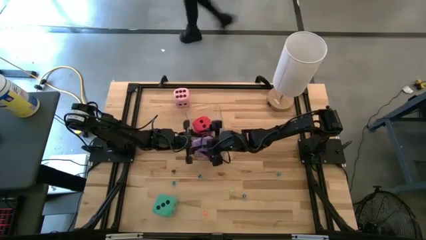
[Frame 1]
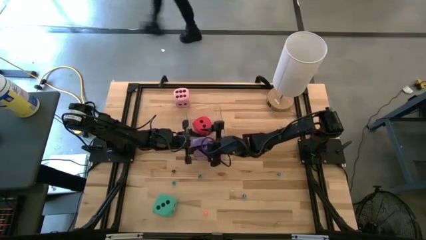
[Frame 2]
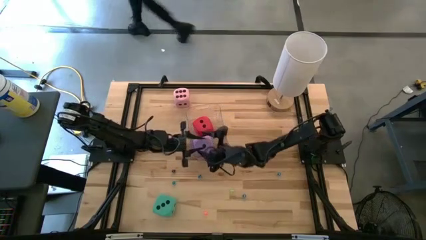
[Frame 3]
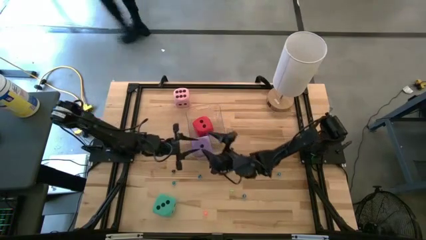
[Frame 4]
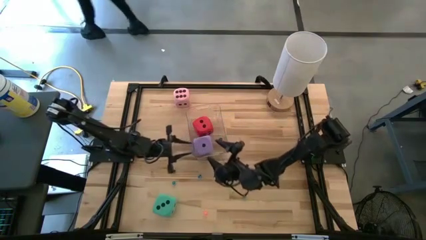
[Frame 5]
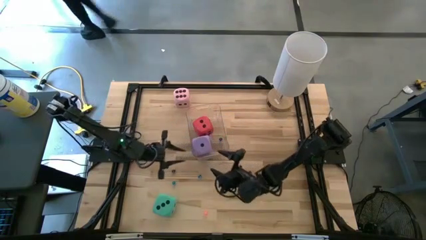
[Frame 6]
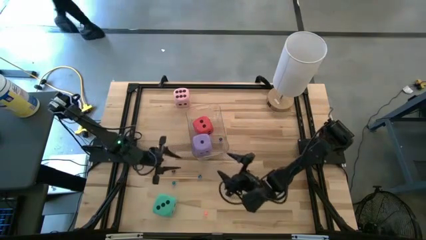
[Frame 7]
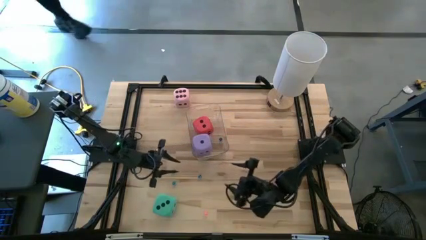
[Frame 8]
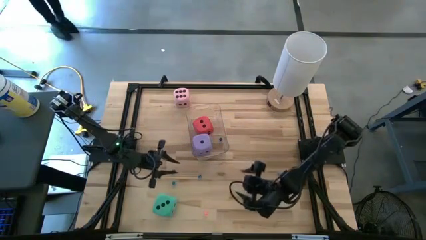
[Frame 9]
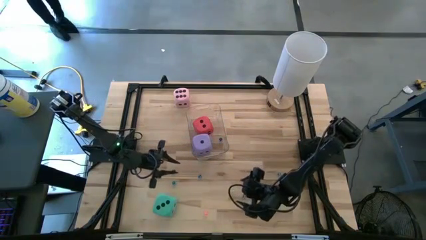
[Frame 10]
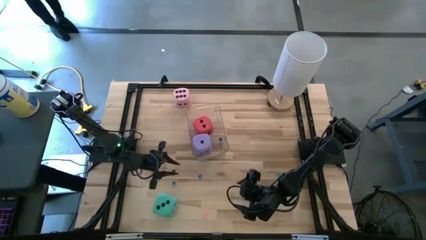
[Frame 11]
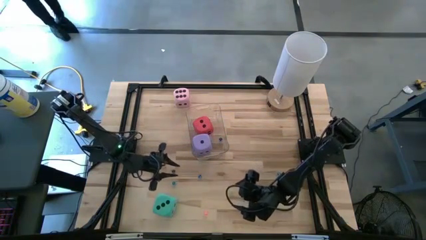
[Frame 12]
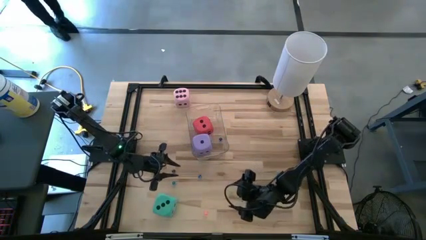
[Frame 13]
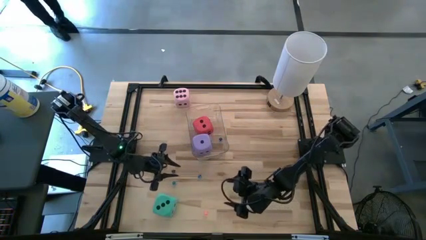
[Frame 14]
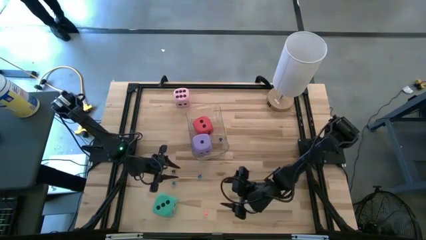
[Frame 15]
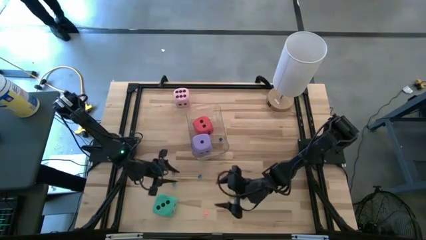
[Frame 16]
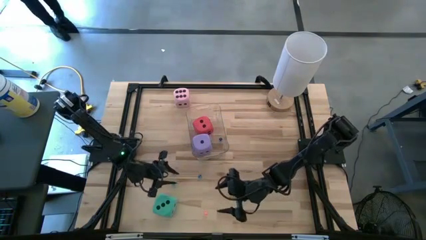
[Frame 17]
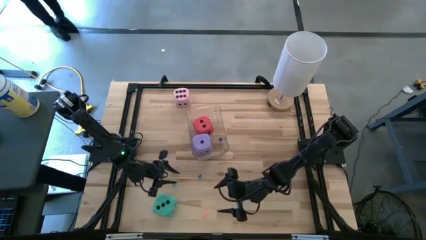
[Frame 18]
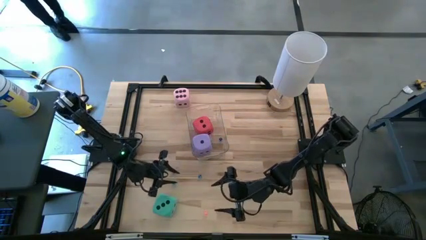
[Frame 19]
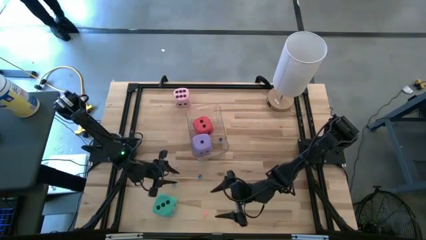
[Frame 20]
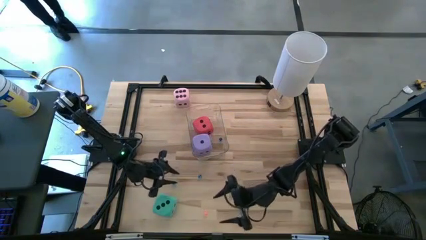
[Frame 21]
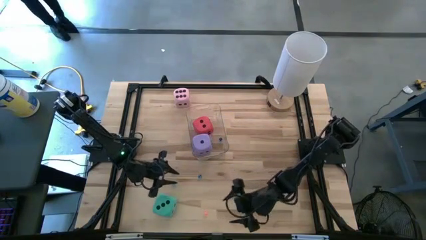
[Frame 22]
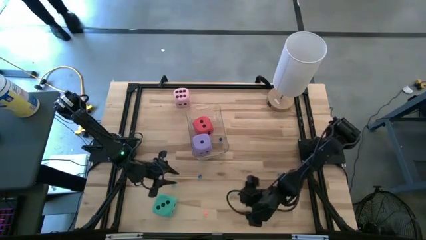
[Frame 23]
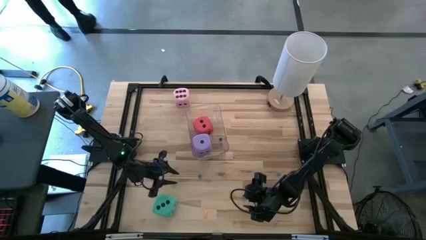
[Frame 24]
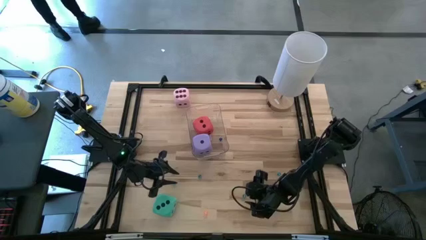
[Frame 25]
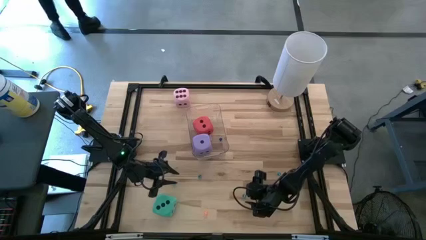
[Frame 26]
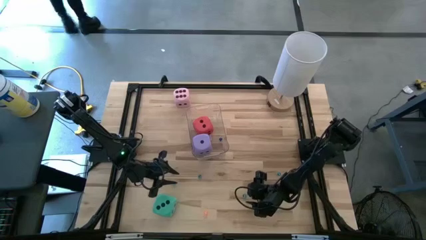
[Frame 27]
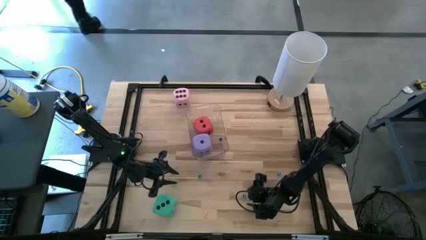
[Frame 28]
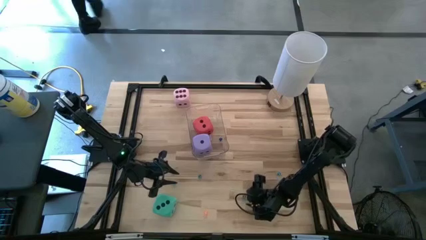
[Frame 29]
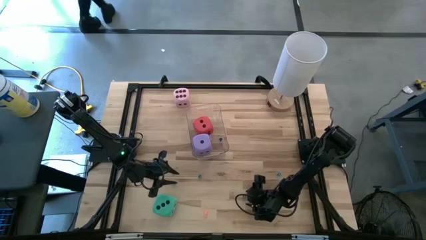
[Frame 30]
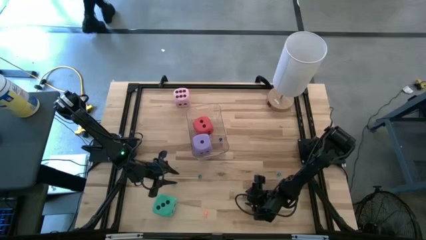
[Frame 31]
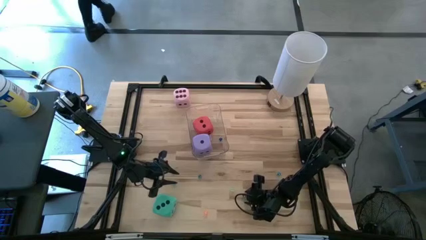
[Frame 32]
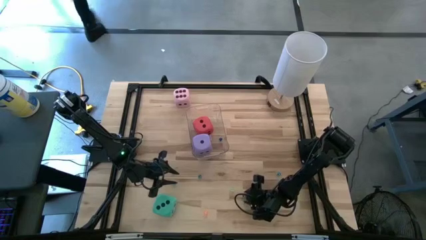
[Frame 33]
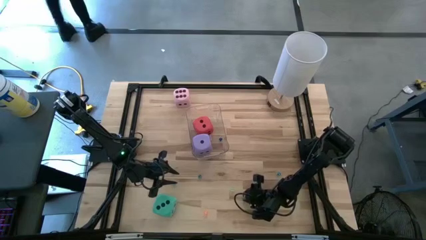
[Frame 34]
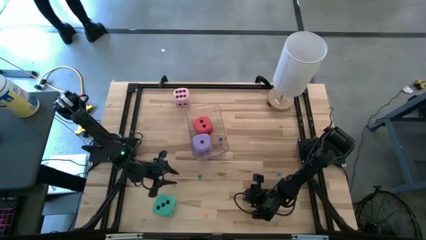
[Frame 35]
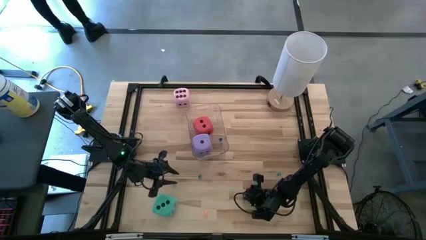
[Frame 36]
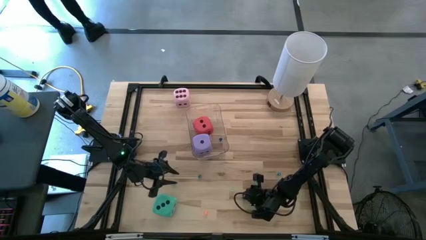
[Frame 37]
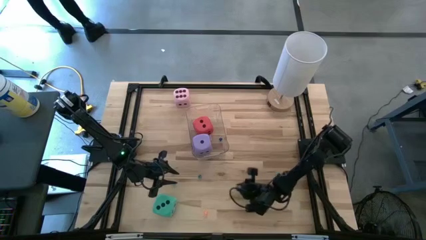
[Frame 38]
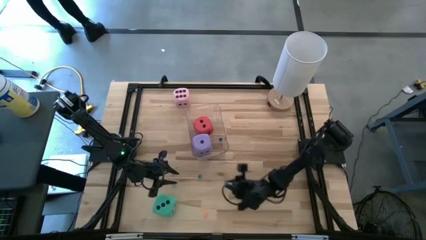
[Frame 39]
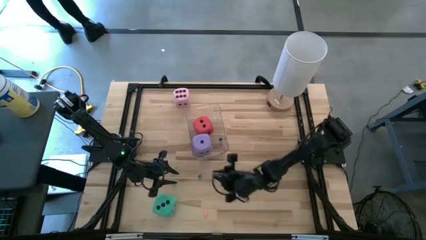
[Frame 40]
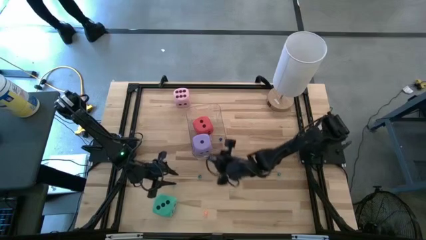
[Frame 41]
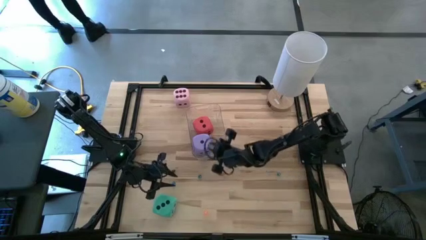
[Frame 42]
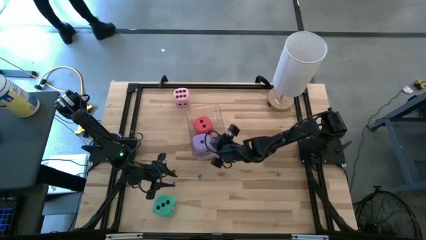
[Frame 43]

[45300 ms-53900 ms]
Task: Pick & Place Dice
Put the small light blue die into the transparent bin

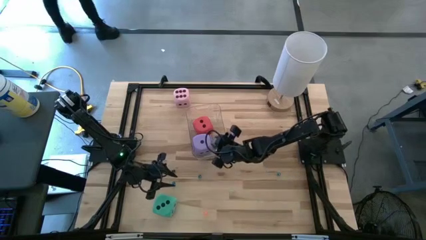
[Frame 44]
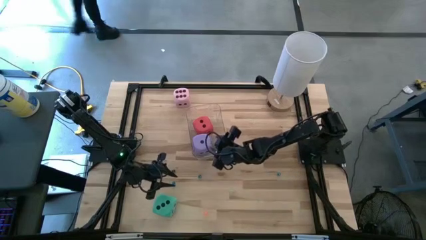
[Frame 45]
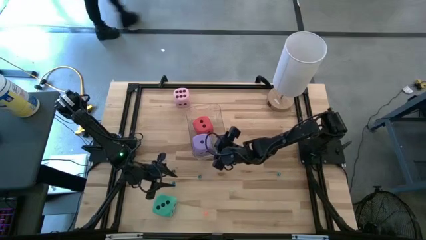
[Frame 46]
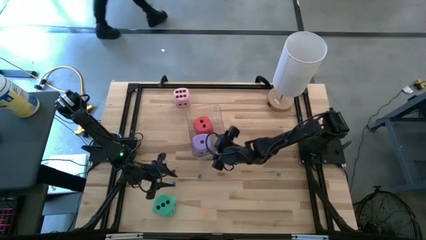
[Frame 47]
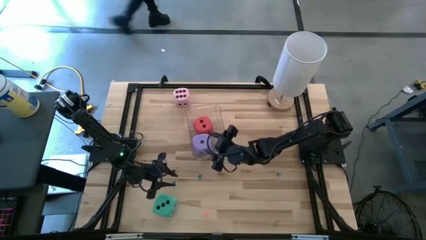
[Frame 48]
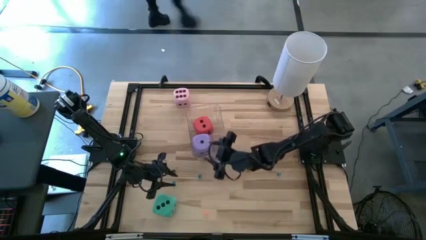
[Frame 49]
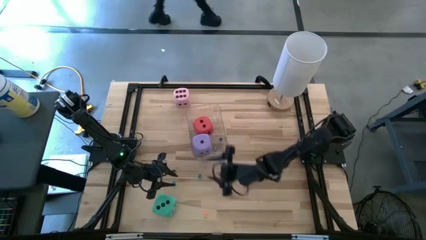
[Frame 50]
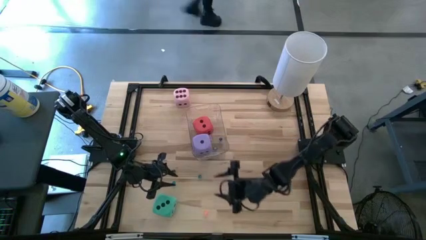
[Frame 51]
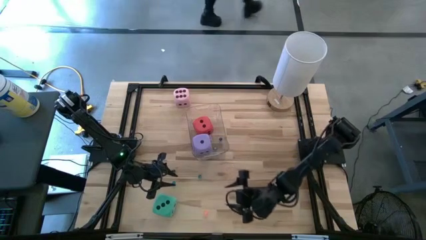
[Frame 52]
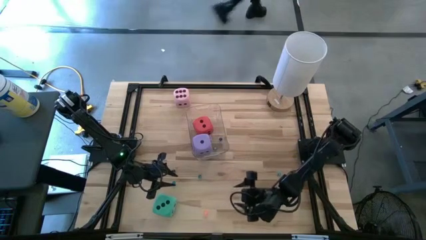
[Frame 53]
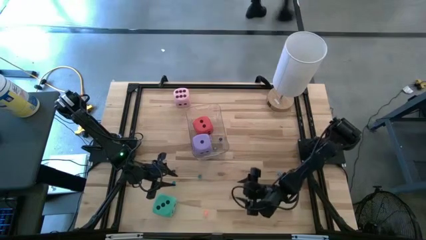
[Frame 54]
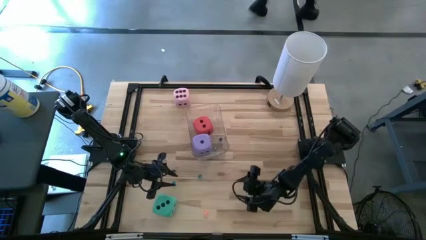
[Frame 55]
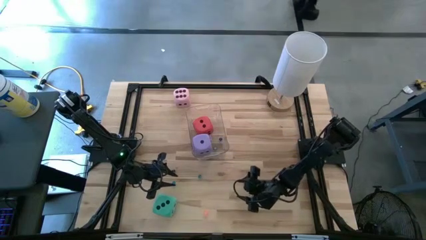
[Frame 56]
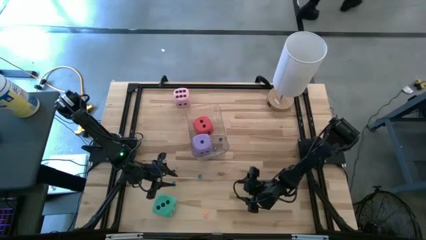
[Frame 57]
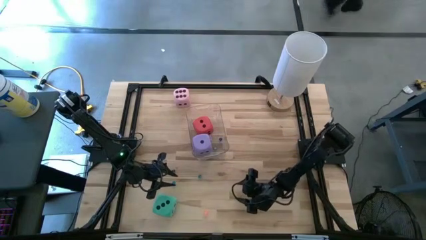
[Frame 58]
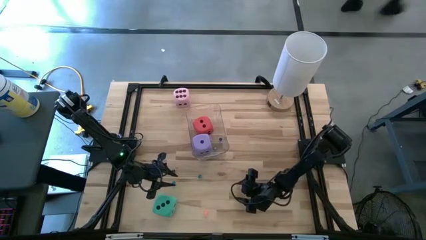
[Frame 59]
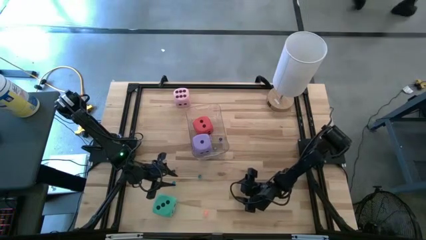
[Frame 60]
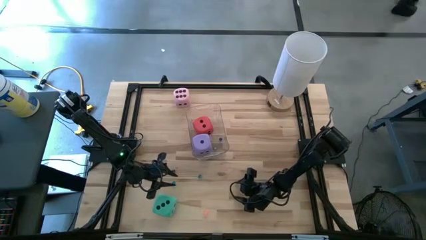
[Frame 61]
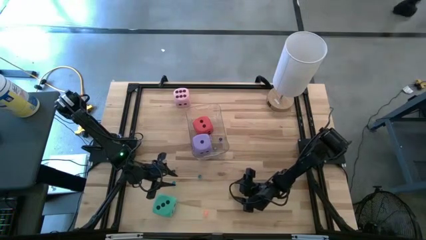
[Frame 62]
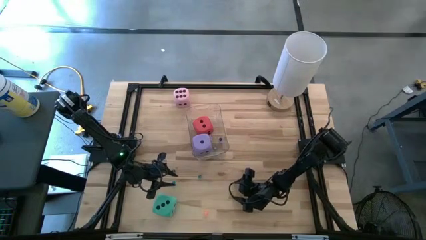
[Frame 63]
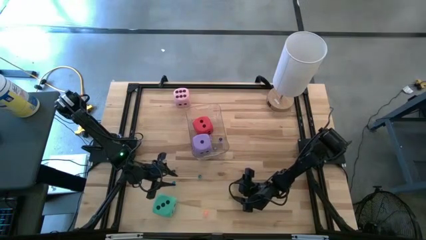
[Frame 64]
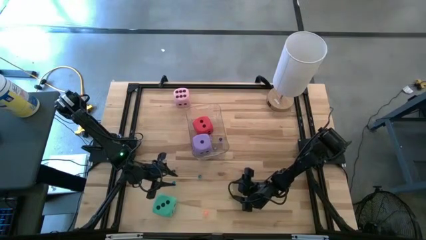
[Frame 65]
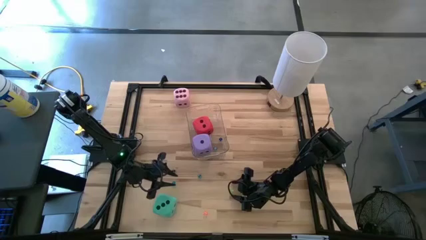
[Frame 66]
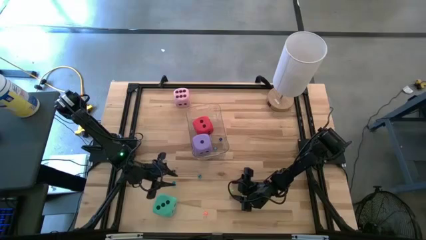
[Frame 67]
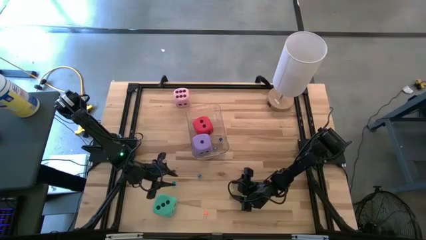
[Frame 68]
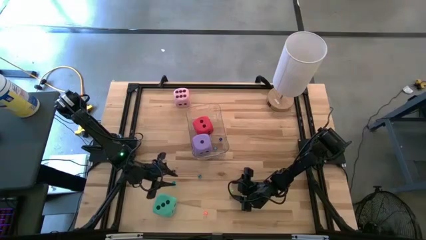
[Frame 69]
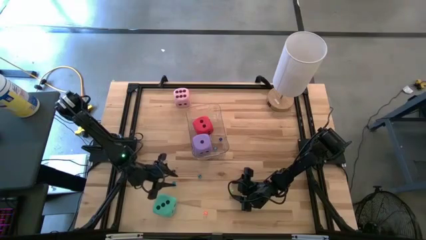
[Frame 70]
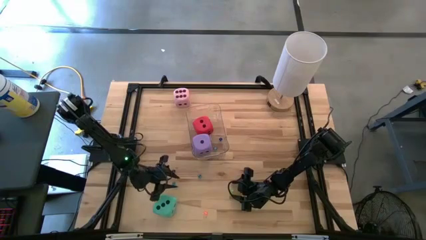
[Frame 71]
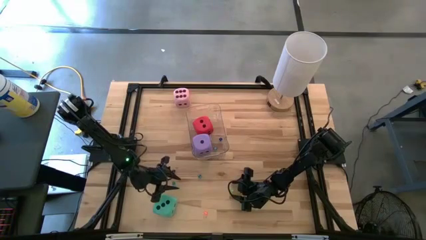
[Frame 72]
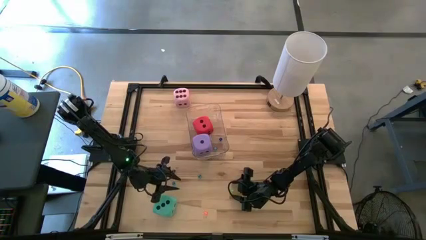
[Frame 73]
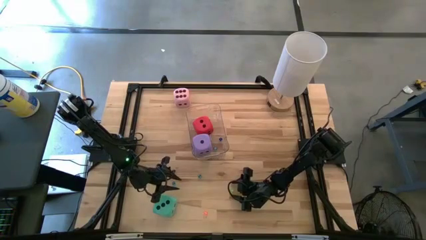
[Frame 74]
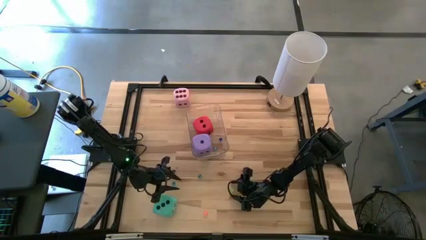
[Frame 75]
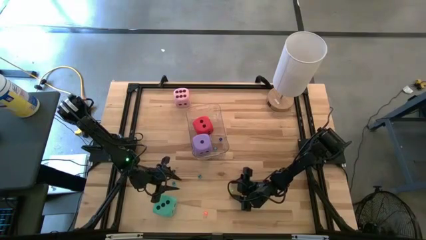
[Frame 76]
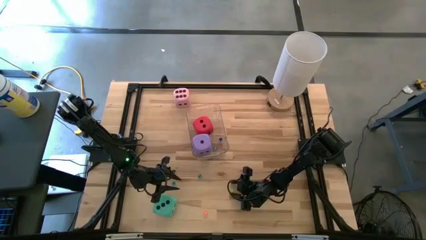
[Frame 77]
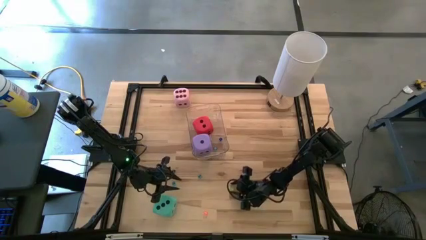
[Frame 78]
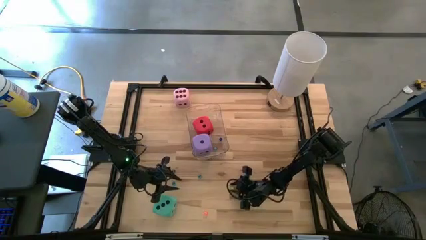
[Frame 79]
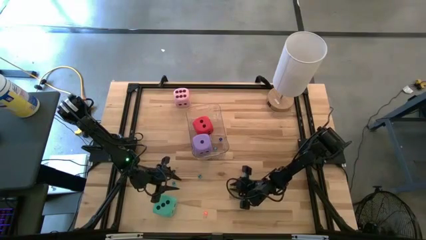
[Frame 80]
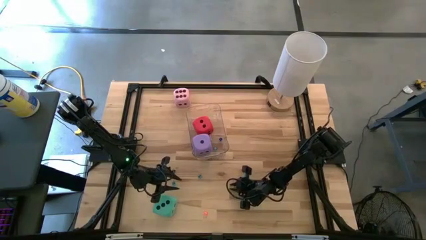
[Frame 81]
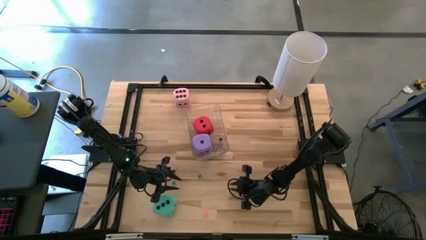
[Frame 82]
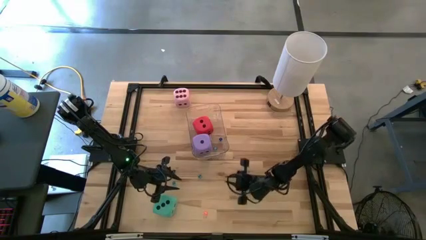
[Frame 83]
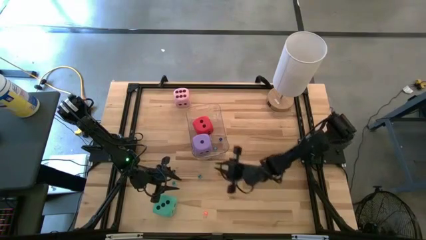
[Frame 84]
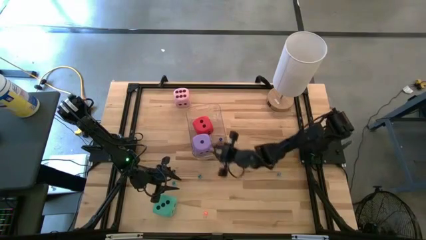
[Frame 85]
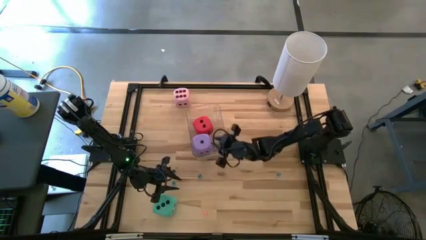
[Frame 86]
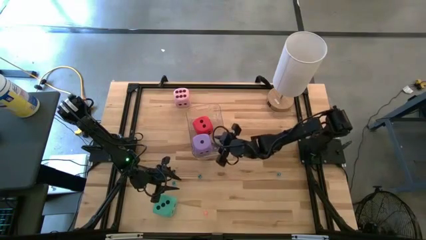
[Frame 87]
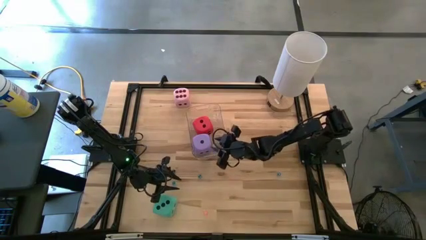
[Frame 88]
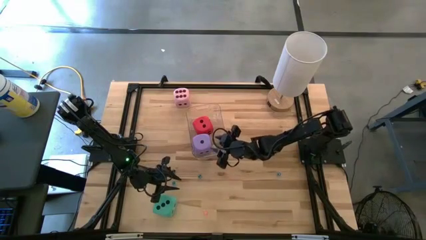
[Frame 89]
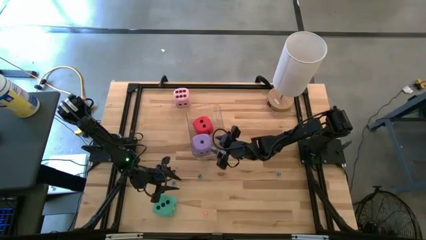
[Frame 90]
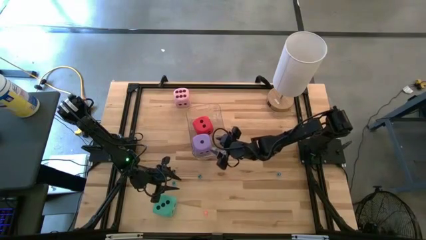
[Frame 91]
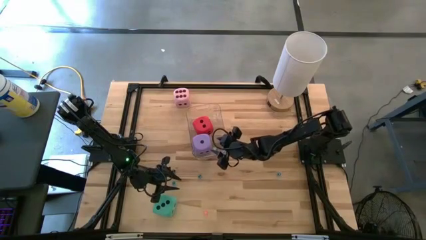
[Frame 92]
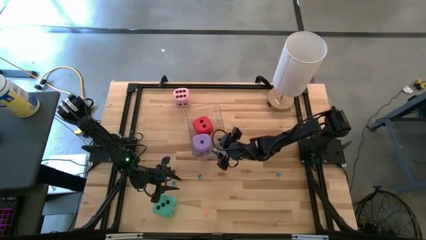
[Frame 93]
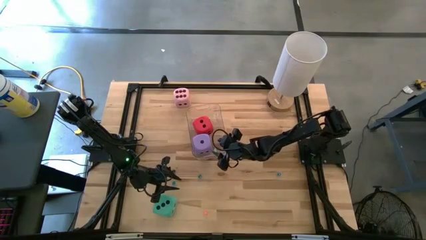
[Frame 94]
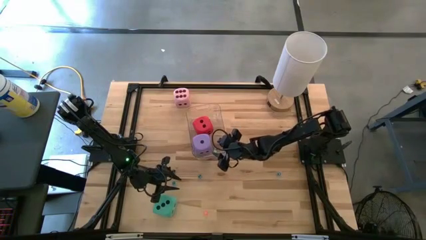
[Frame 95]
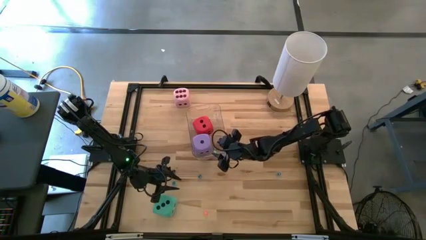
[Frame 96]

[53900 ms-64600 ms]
Put the small light green die into the transparent bin
